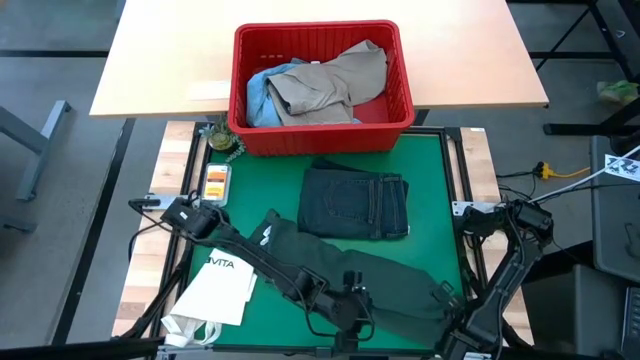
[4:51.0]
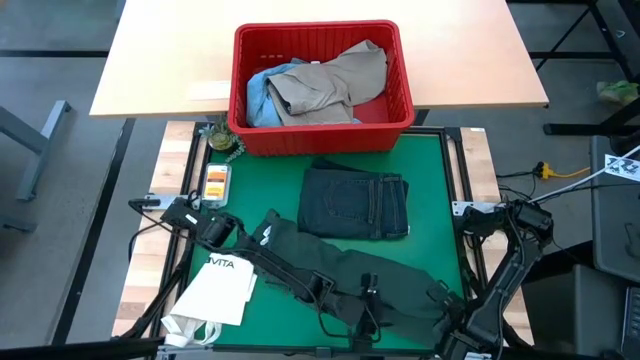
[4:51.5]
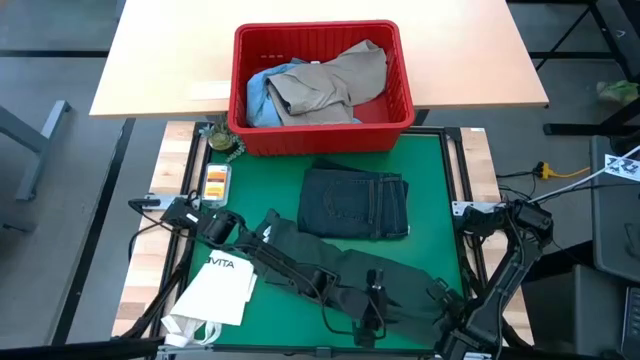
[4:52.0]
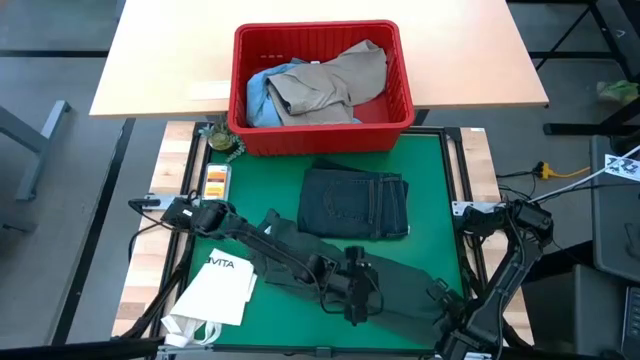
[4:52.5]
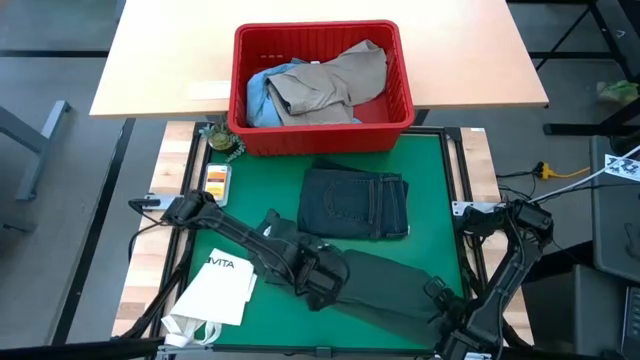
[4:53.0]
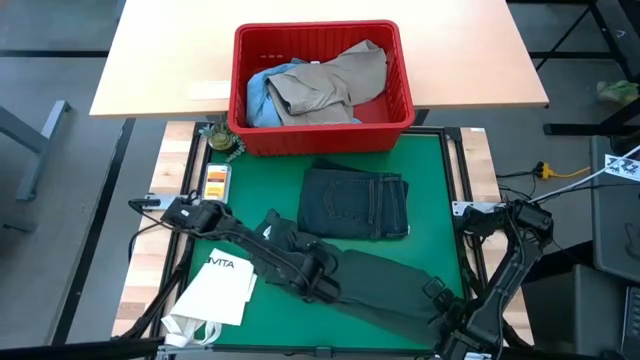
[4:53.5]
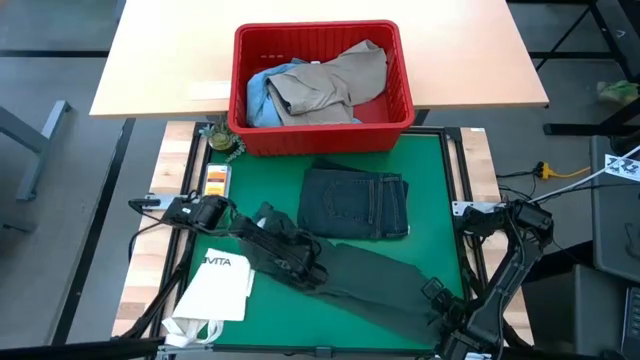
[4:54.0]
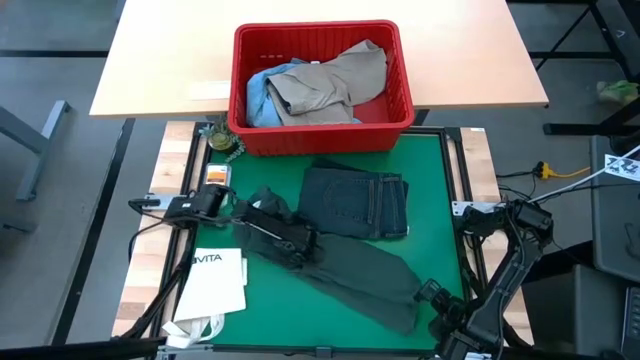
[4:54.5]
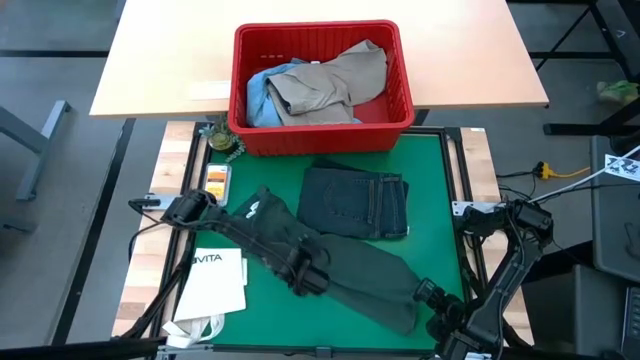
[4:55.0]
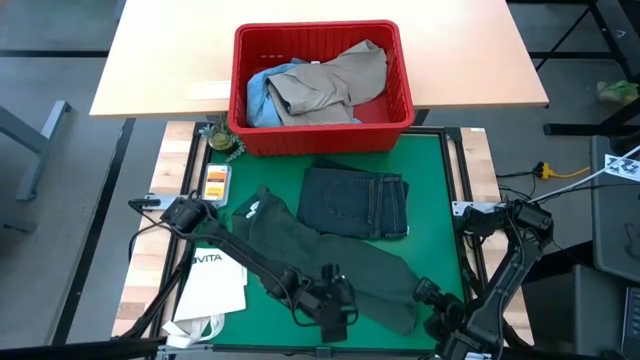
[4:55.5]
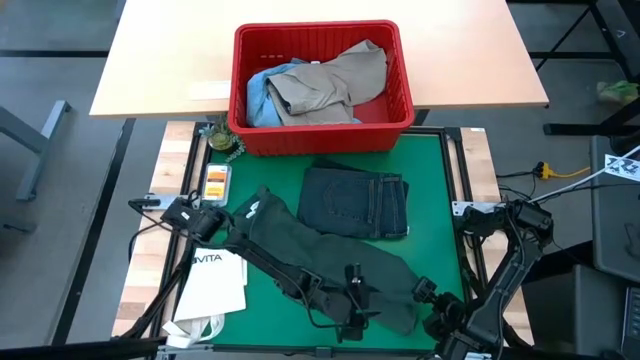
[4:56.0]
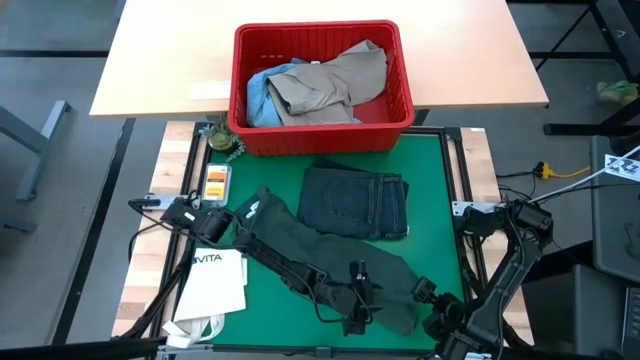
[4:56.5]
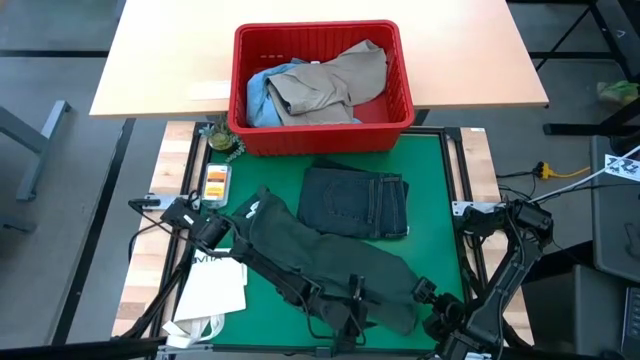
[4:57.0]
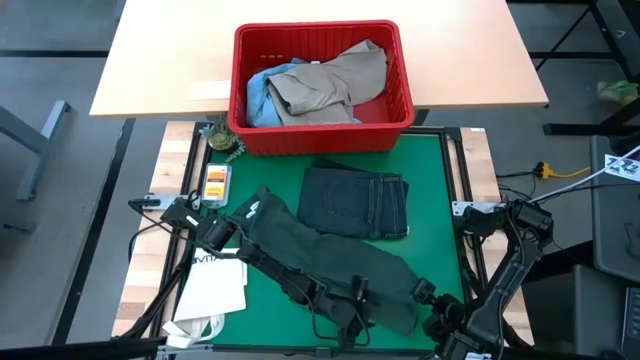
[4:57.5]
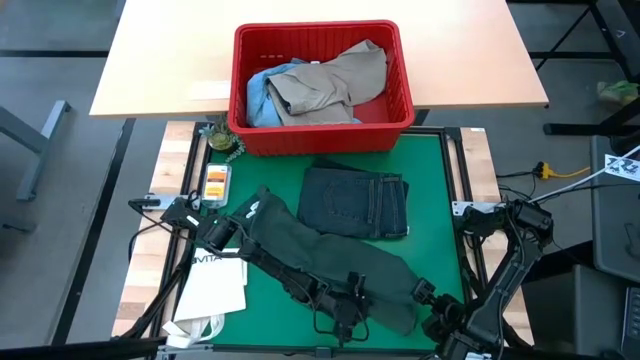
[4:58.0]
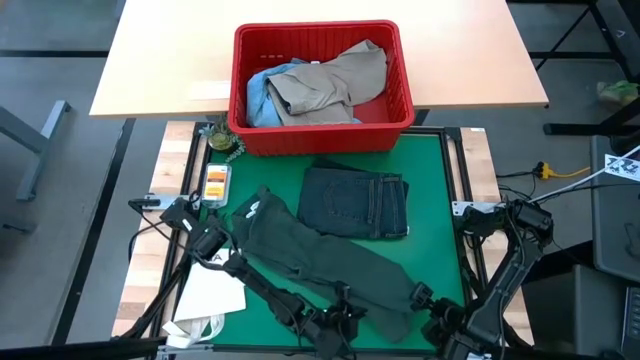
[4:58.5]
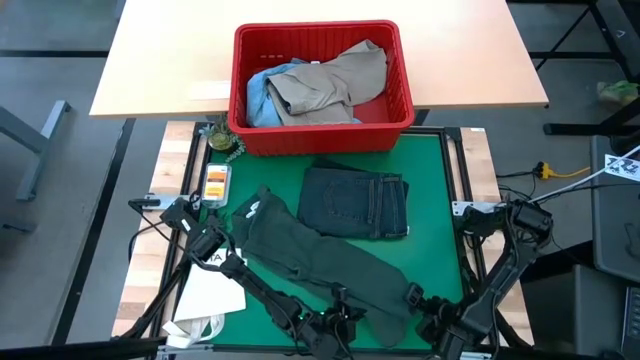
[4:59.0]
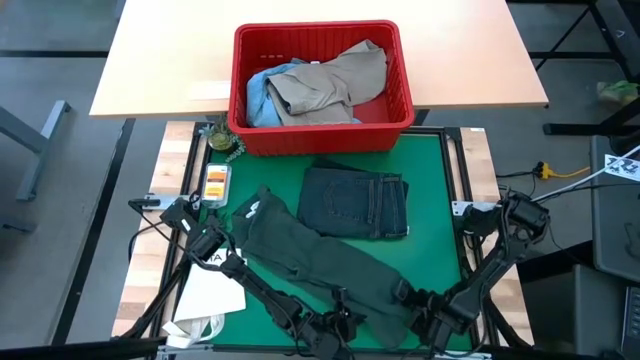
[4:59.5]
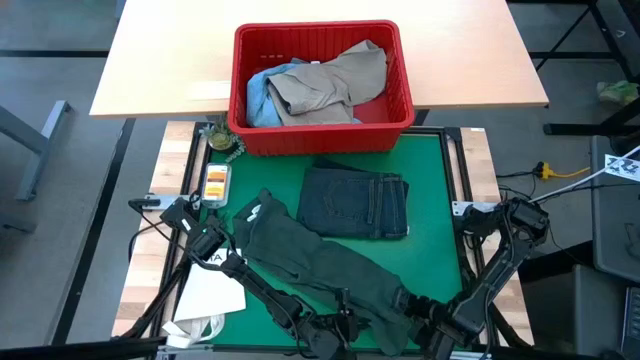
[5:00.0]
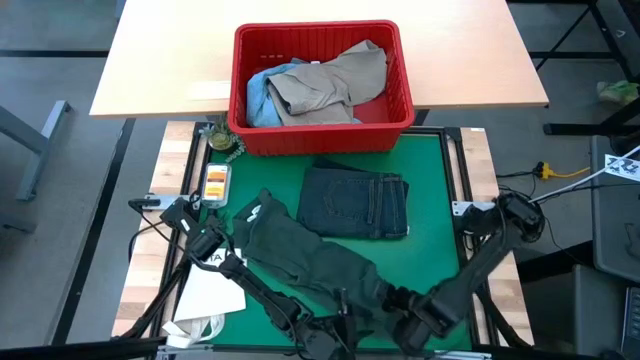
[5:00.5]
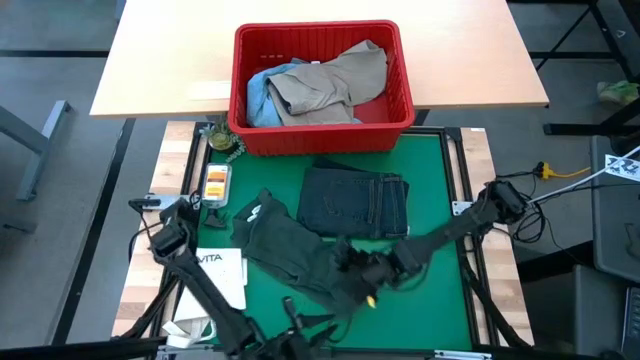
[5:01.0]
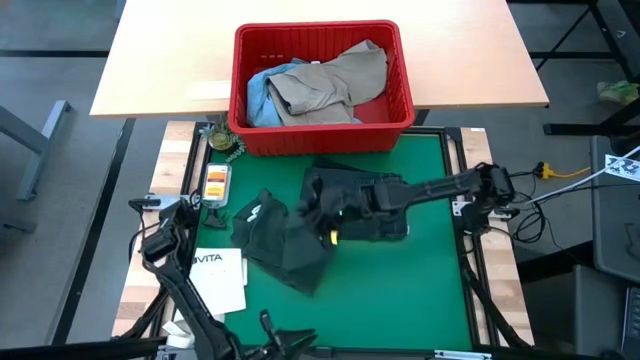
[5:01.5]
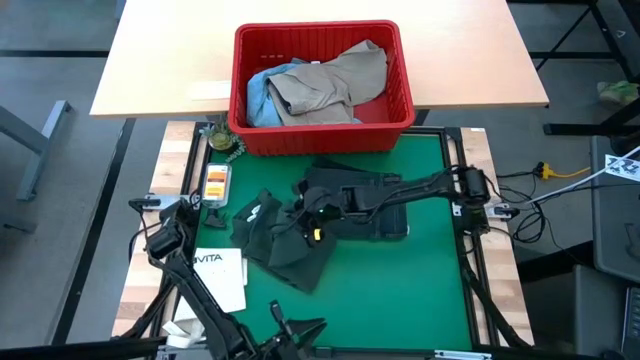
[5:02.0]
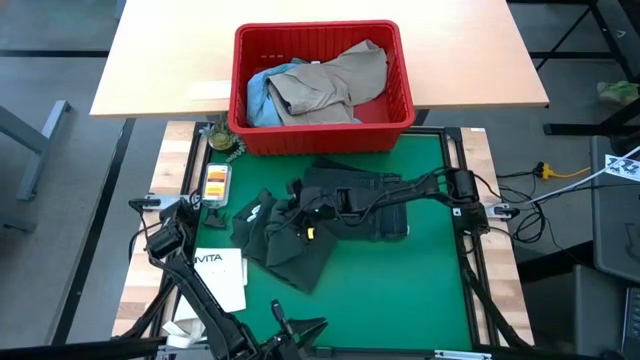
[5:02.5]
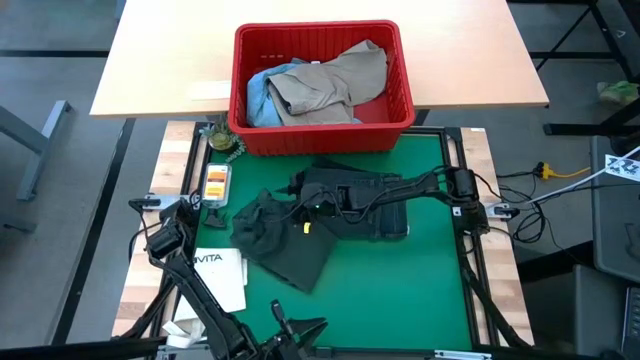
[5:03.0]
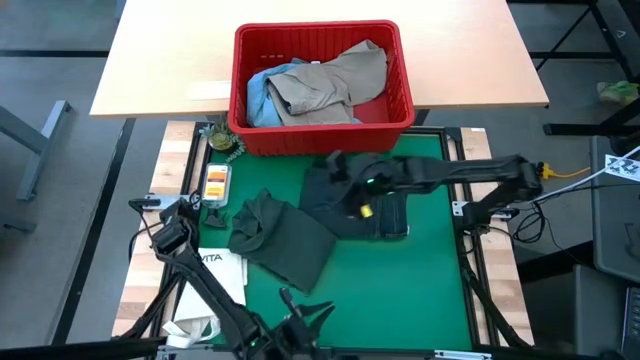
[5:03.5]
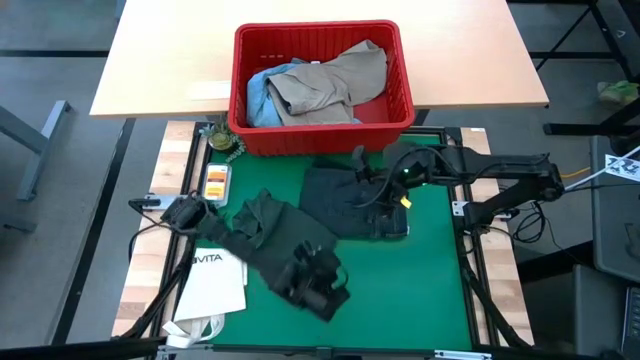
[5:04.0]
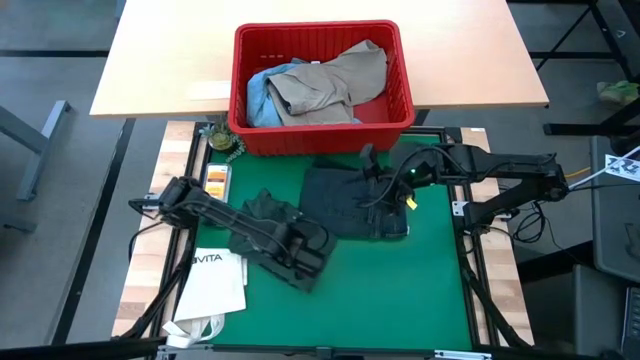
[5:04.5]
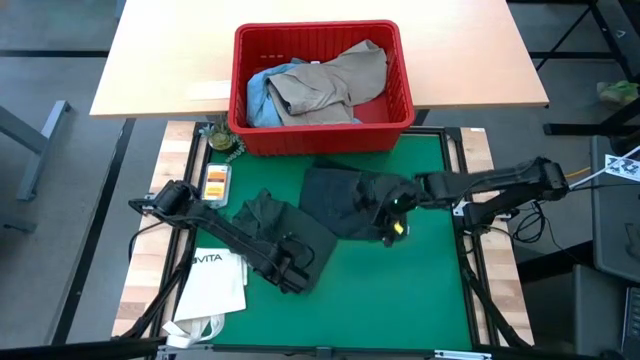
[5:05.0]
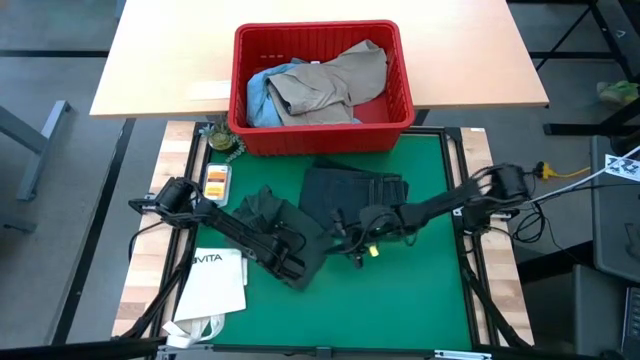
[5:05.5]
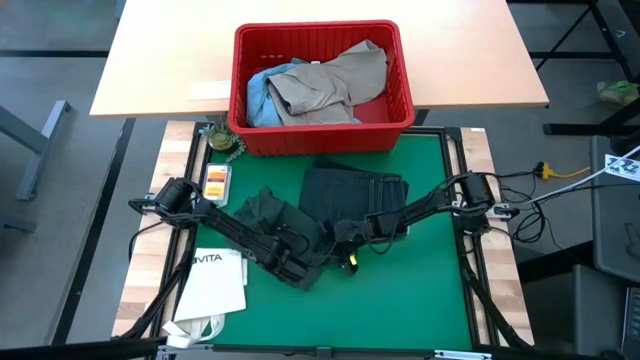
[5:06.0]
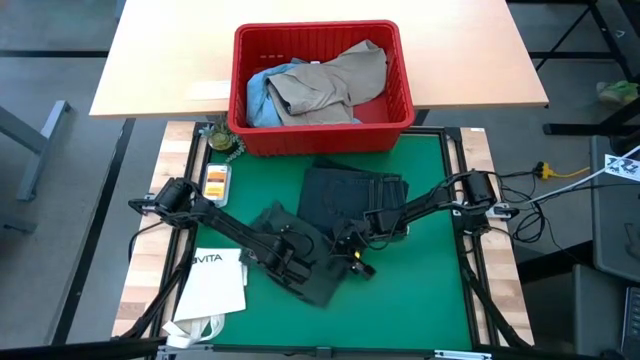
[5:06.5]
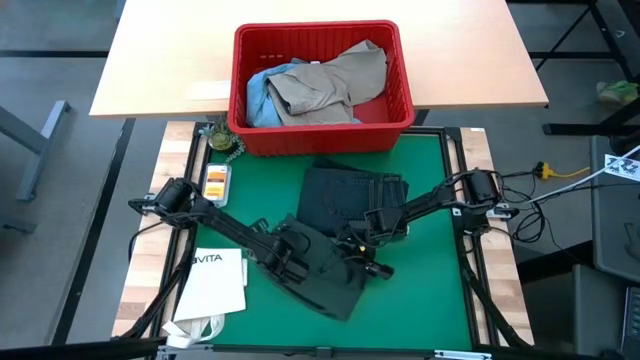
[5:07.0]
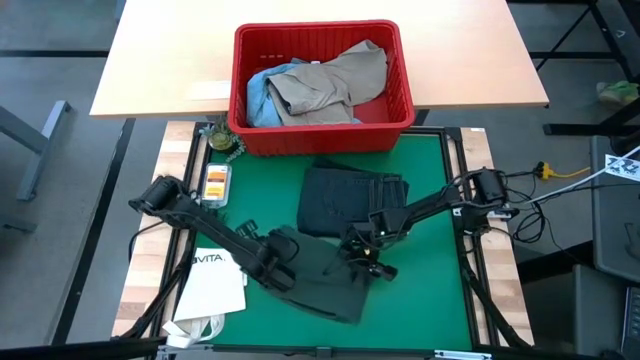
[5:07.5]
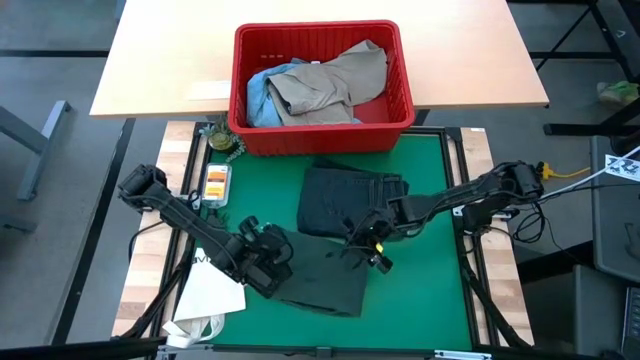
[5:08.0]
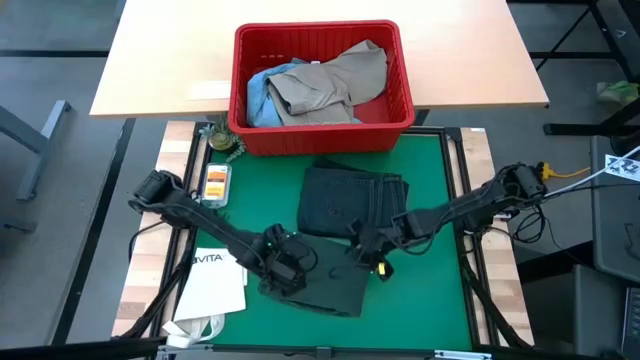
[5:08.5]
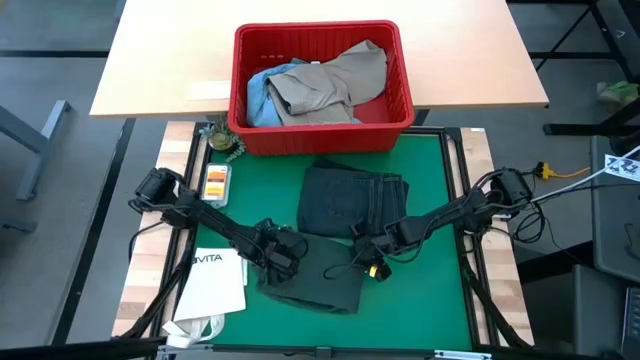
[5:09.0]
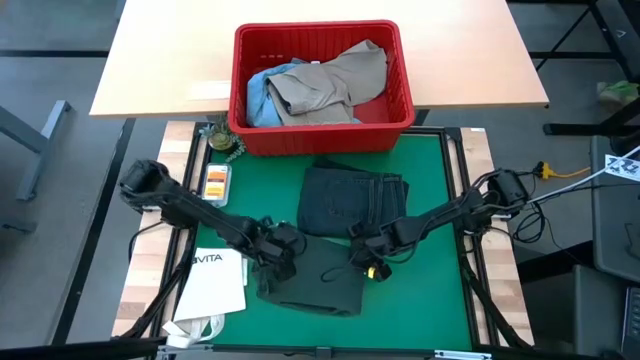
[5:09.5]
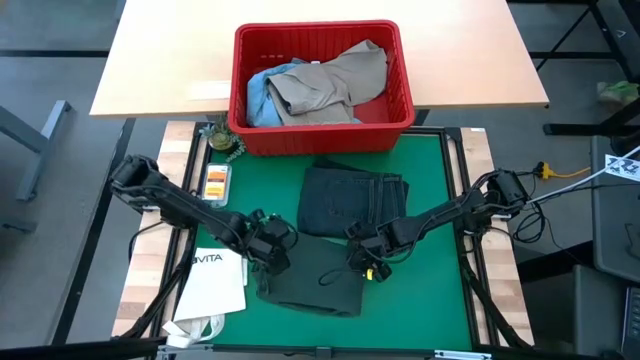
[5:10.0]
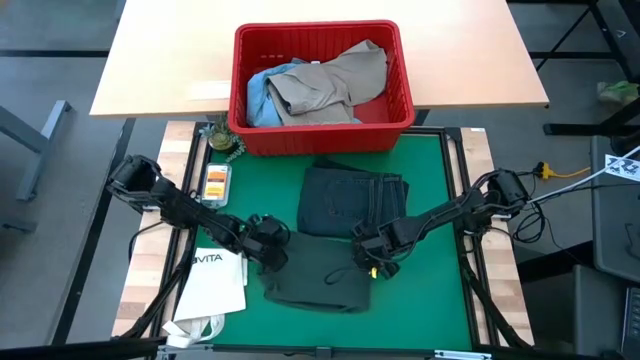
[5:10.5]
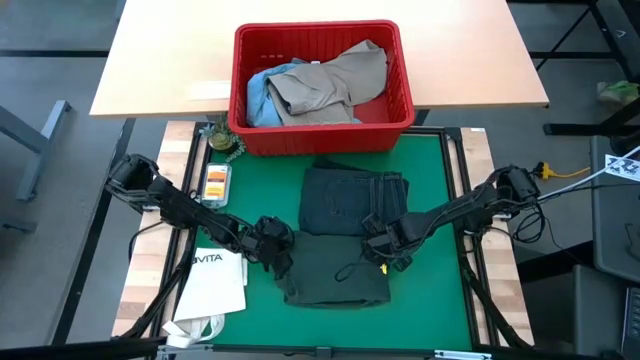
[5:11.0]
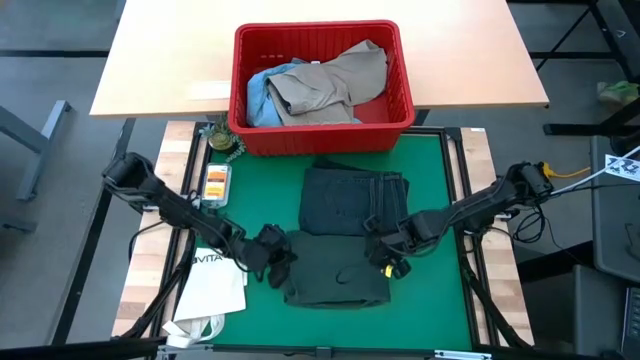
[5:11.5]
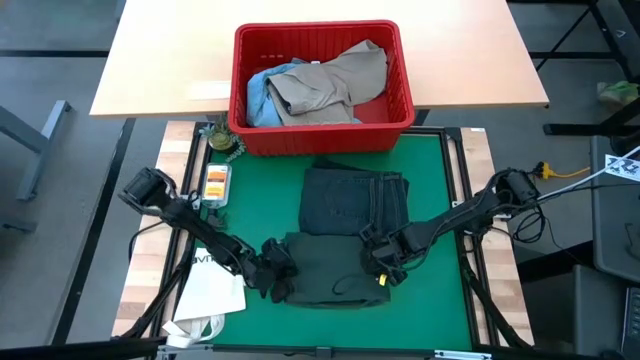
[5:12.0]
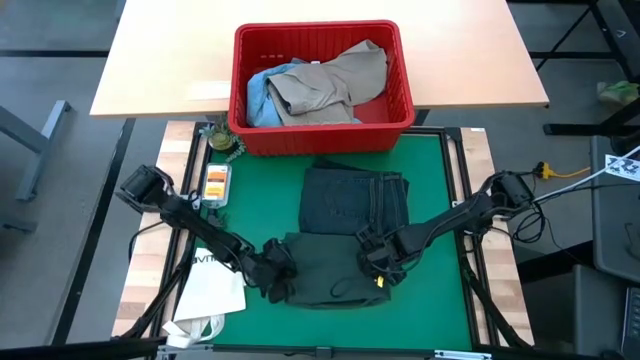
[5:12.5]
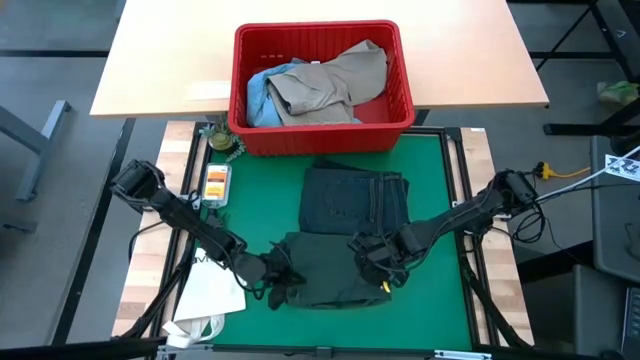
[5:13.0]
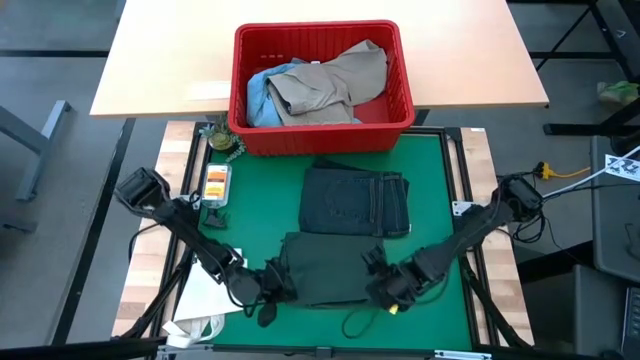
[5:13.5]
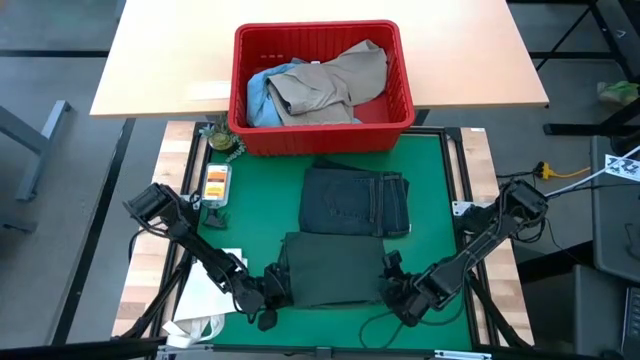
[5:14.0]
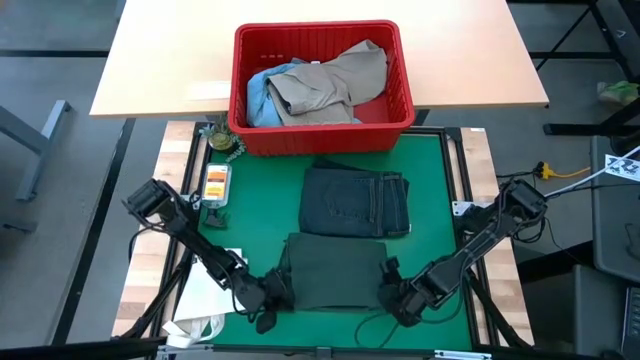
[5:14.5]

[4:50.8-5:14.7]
Task: Fold Laundry from Bin
Fold the green shirt
